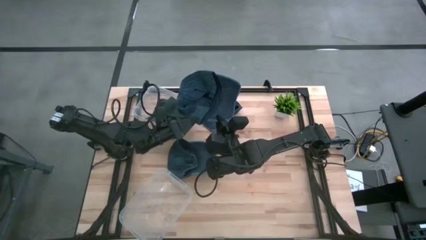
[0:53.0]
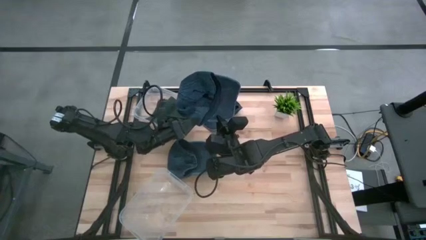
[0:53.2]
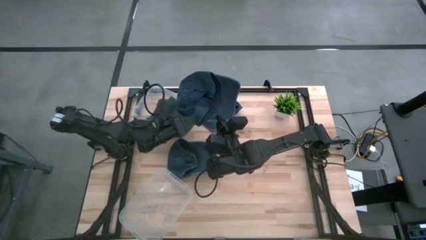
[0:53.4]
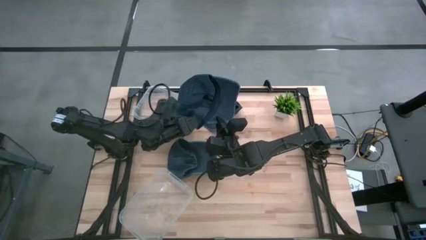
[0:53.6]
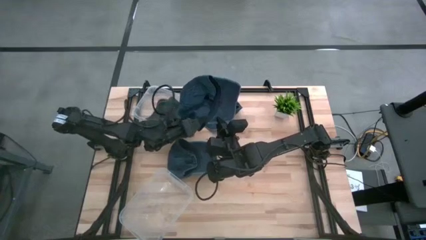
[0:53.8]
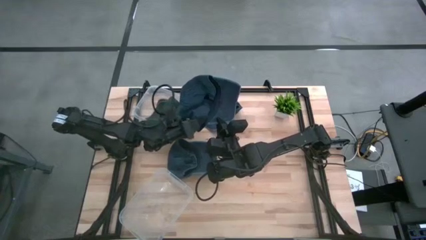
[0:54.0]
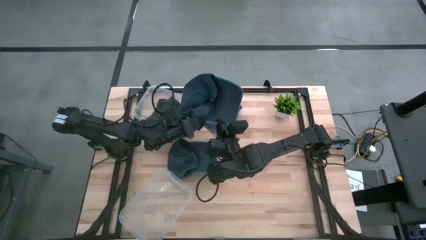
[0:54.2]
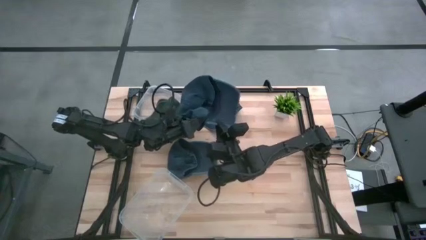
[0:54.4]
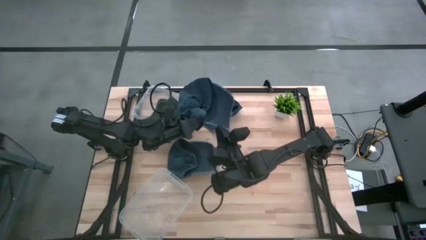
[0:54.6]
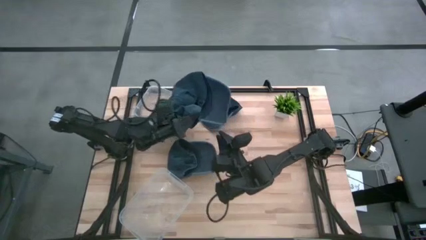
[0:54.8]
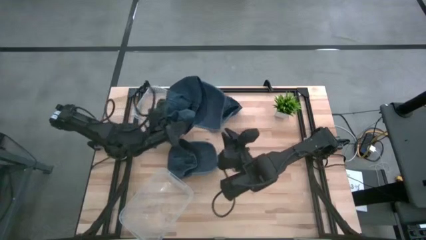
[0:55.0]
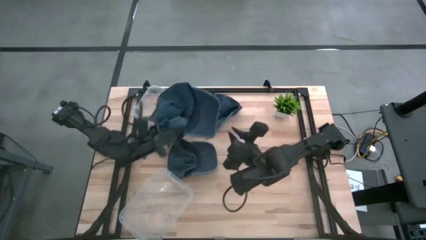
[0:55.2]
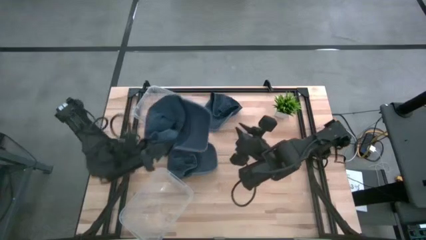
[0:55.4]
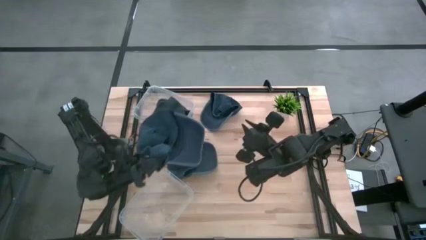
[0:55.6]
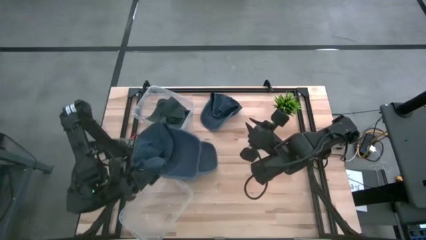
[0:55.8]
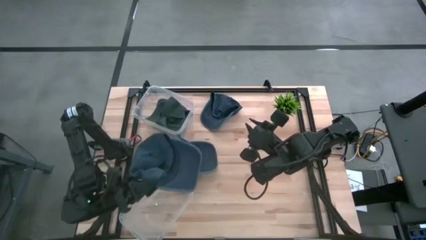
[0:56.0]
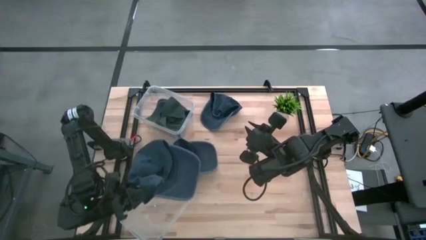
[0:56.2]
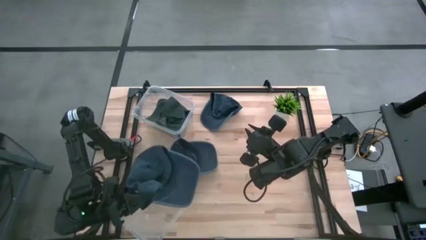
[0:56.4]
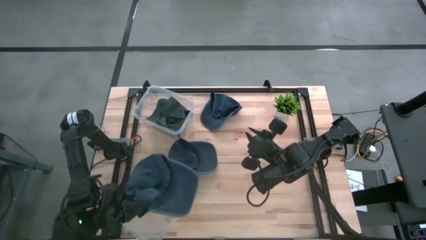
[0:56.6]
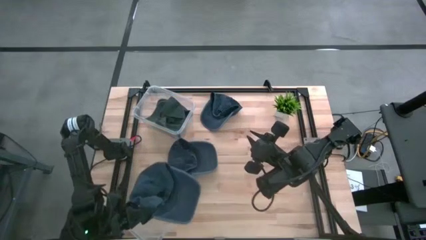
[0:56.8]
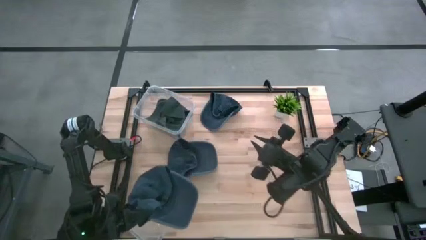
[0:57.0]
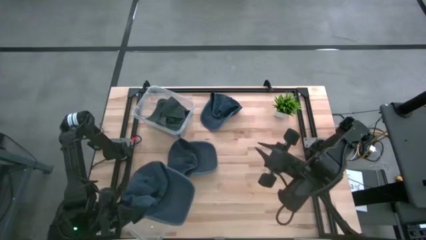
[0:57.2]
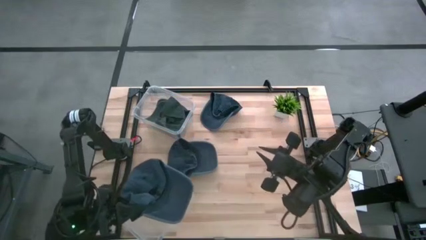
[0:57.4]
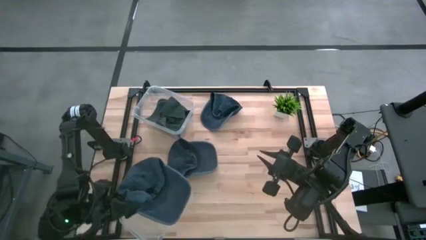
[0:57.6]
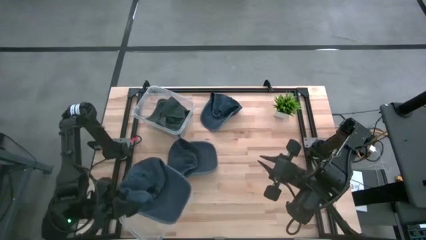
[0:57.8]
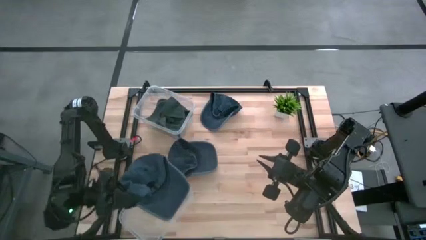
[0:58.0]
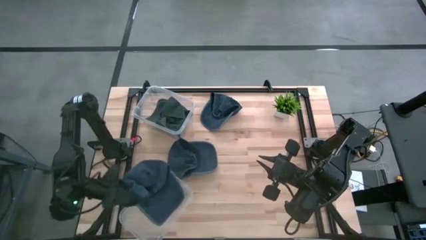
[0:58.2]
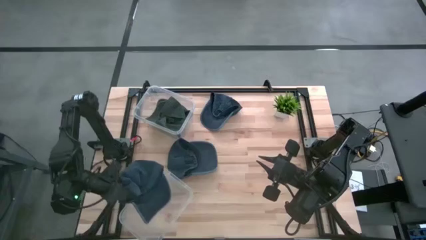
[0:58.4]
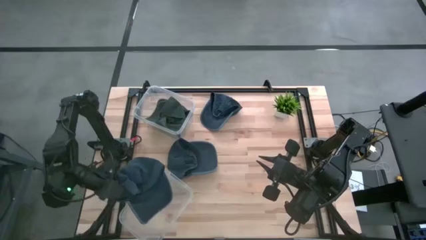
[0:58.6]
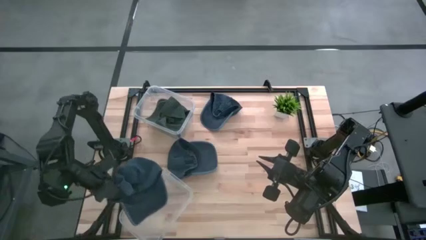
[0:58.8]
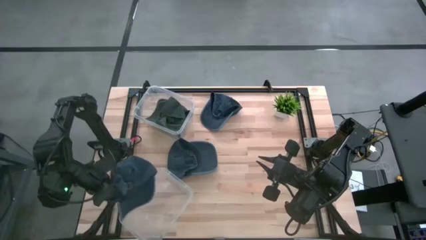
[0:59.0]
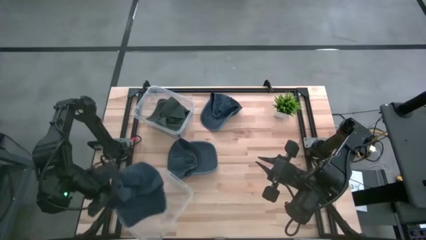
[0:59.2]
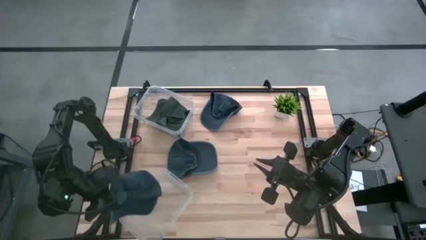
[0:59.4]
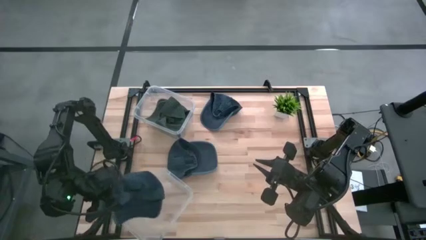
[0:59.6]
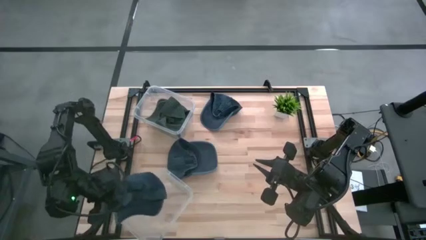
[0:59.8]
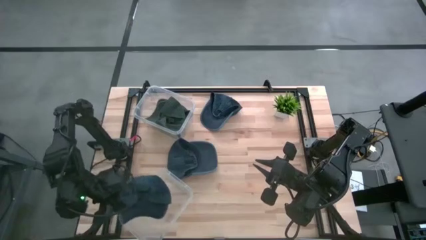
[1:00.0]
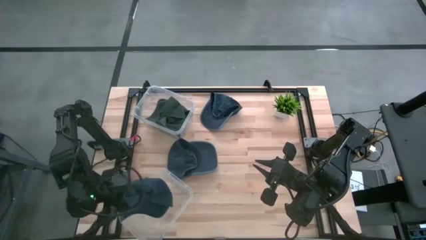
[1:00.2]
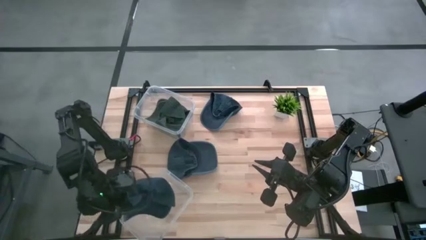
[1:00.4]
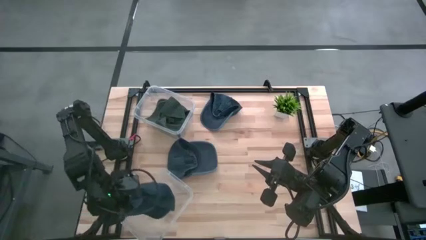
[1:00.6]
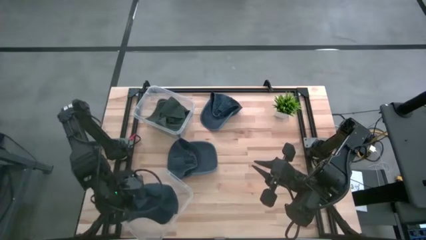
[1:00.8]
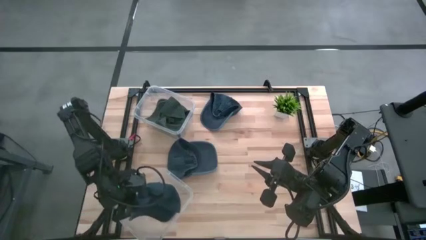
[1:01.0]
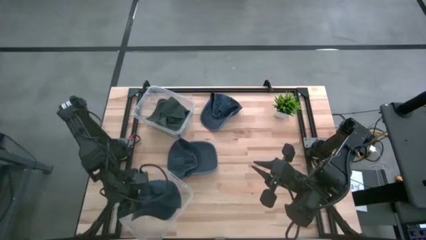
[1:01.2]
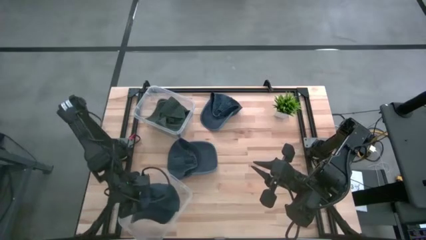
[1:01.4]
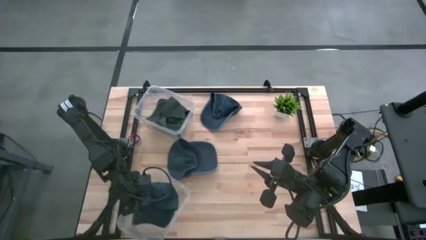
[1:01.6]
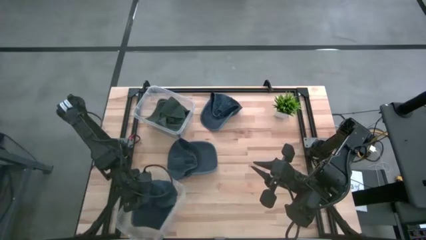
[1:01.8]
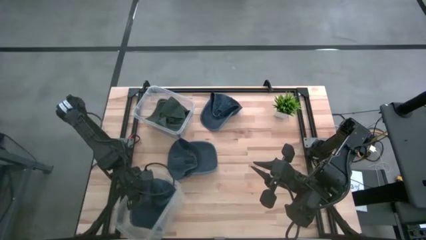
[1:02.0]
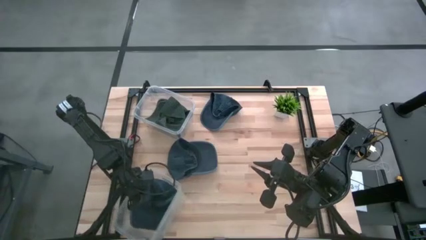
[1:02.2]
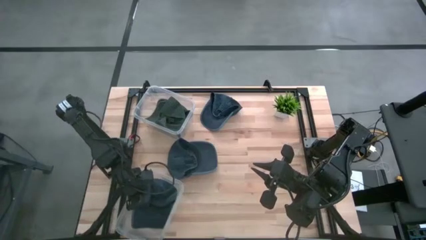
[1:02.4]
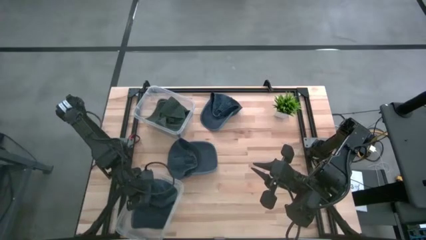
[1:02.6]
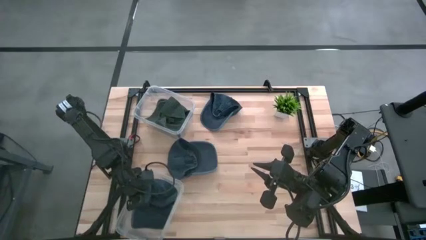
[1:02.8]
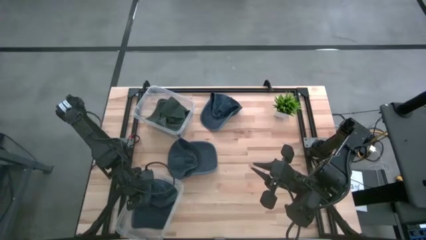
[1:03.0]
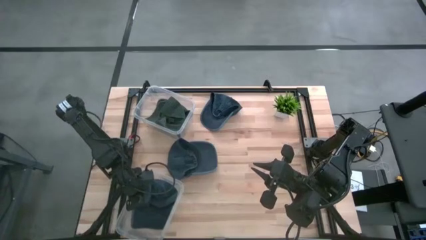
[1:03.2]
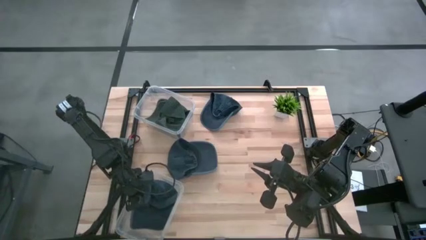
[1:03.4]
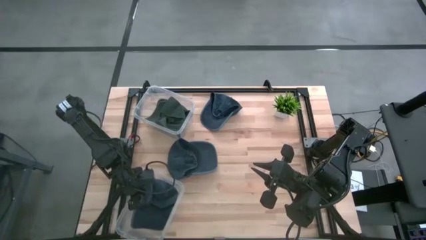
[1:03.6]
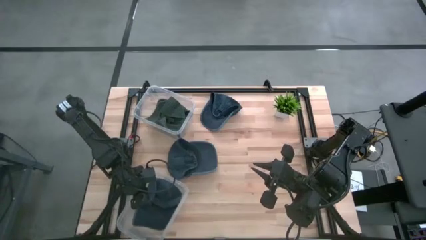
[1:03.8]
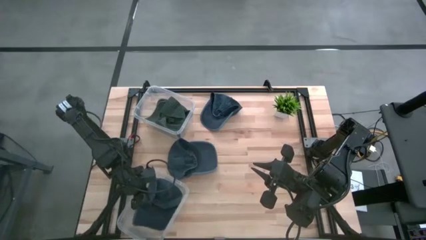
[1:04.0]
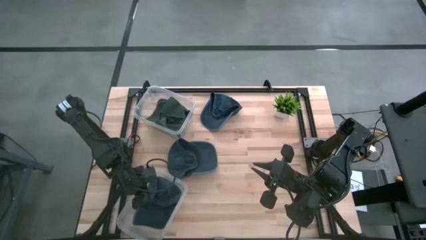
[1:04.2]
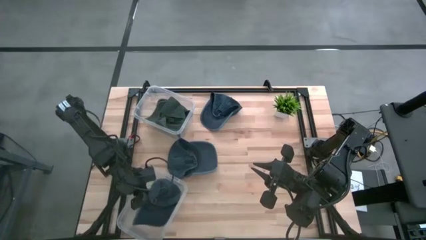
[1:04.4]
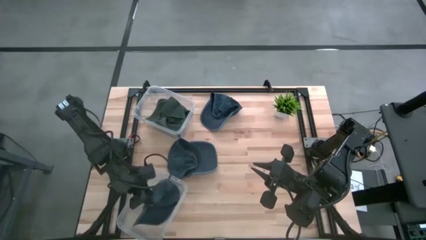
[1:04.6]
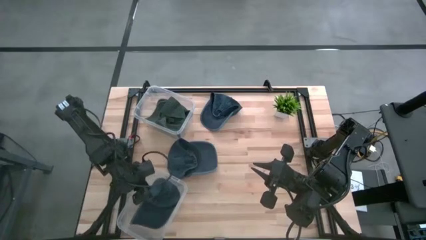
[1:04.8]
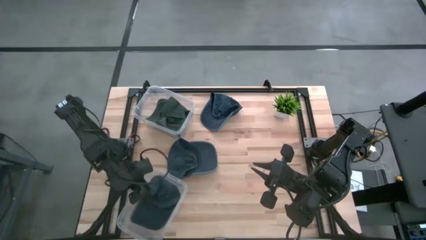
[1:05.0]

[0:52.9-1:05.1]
Task: Pick & Place hat
Put the bottom right dark blue cap into the bottom transparent bin

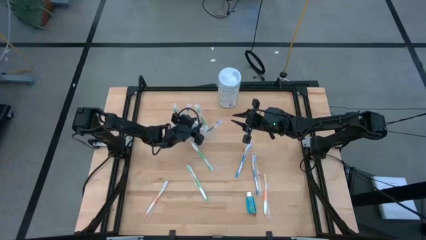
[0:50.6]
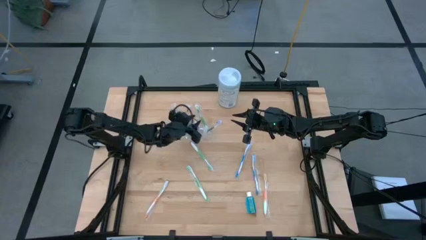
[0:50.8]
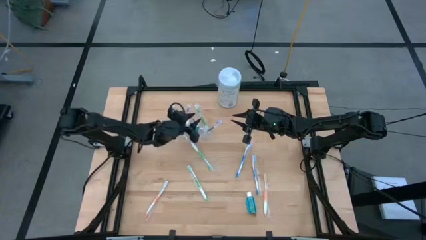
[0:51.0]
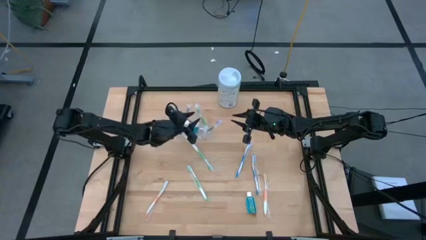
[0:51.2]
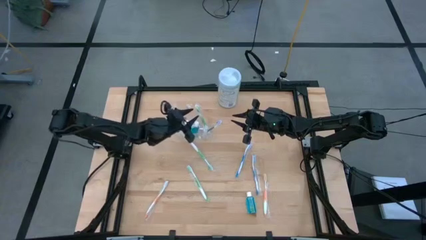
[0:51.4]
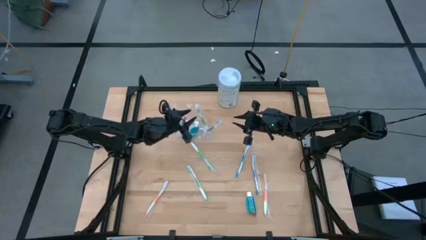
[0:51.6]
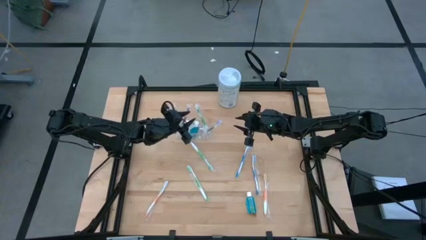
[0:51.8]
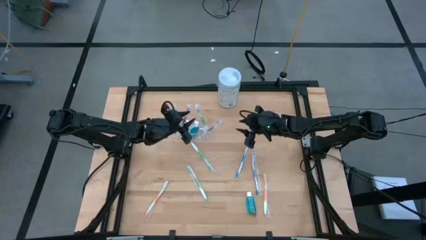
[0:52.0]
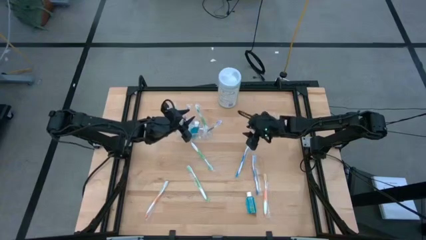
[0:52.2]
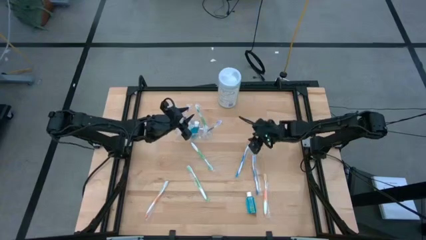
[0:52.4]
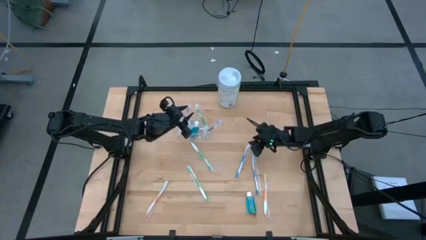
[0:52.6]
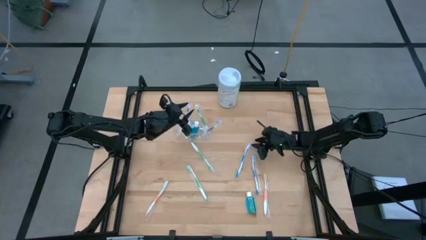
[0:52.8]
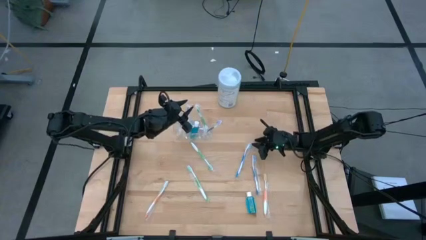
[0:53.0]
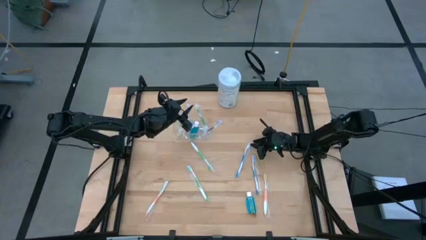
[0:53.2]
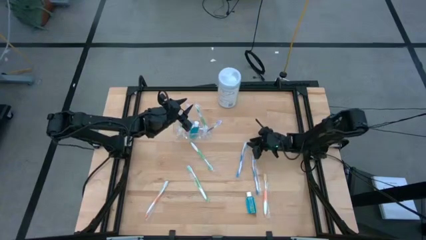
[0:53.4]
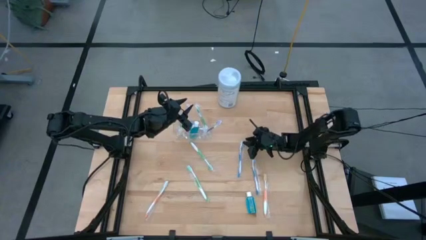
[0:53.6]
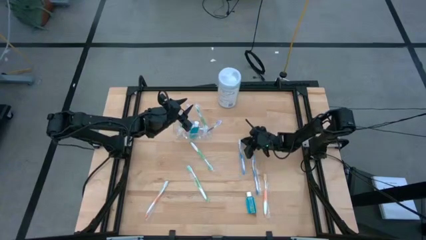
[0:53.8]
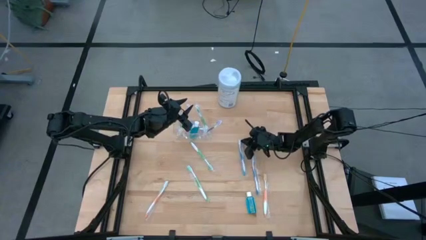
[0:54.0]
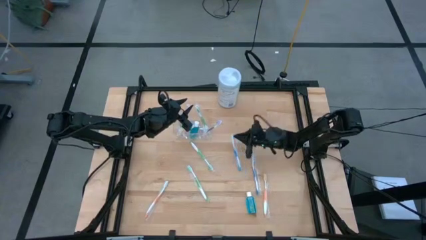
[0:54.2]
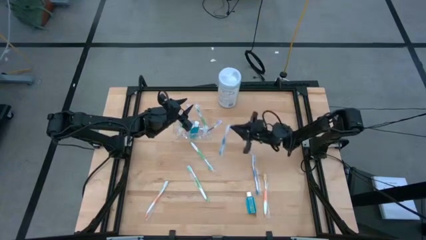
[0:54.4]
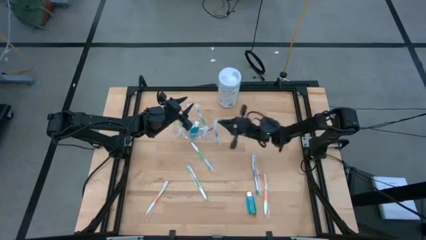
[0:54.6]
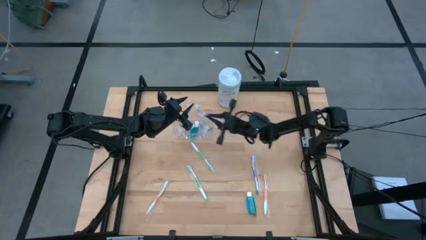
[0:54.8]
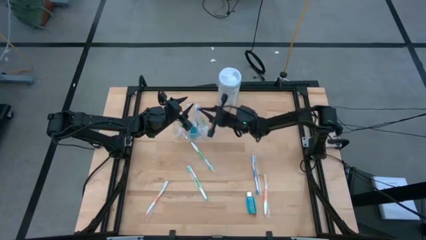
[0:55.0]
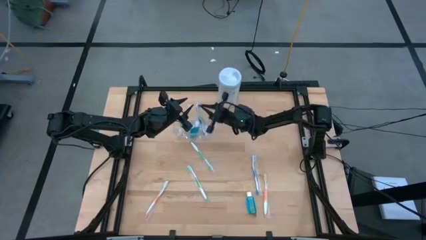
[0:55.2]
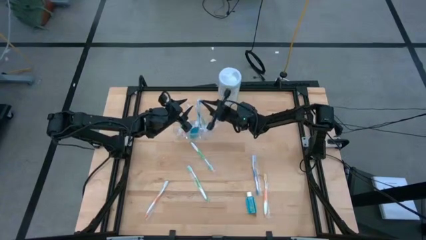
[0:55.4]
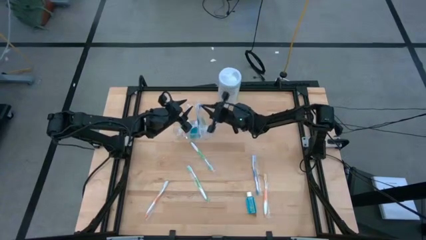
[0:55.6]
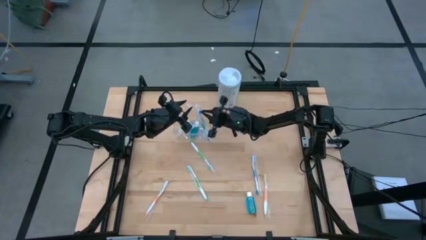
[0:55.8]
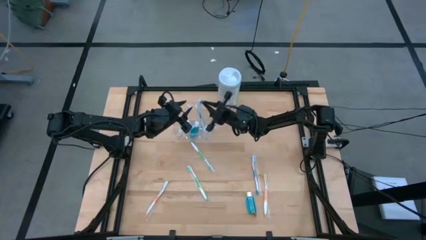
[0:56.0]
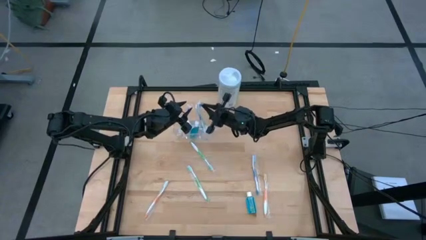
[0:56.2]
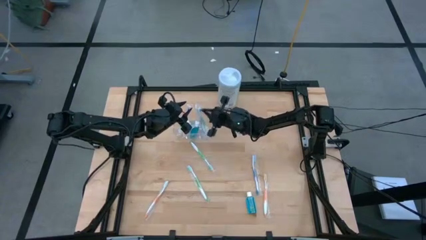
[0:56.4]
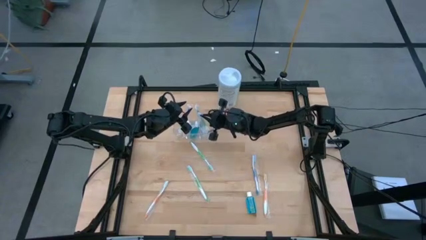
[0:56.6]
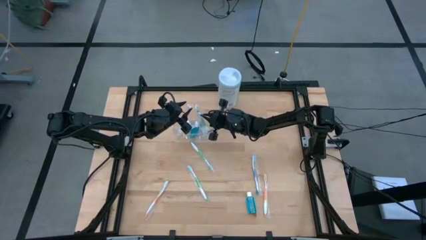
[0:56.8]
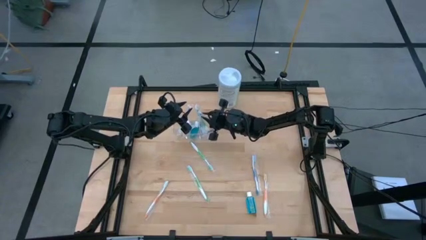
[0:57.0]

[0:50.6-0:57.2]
Task: Pick & Place toothbrushing station
Put the blue toothbrush into the transparent organizer
